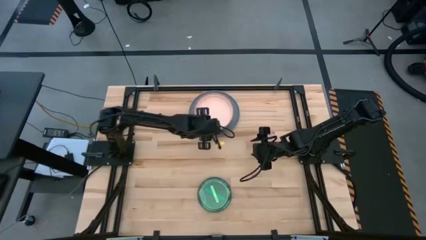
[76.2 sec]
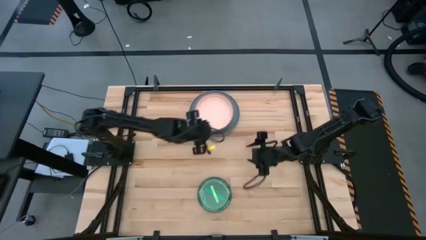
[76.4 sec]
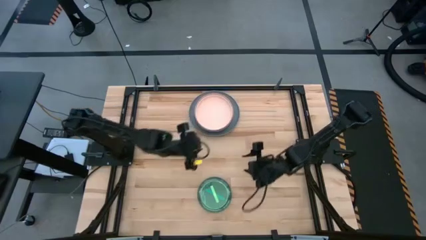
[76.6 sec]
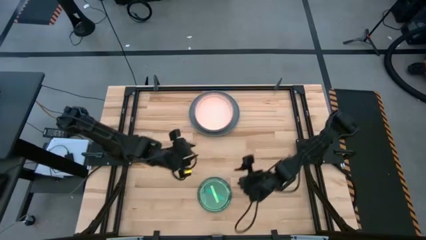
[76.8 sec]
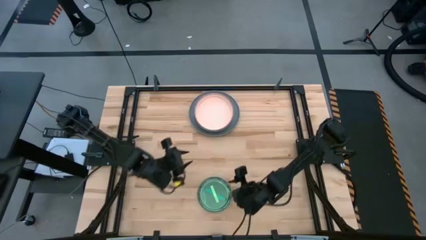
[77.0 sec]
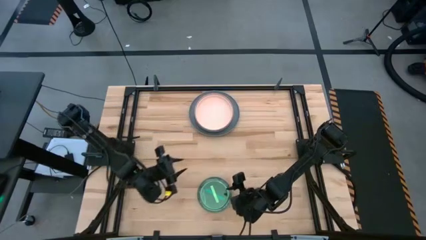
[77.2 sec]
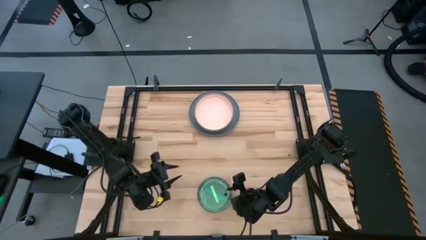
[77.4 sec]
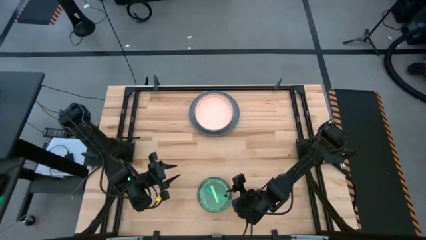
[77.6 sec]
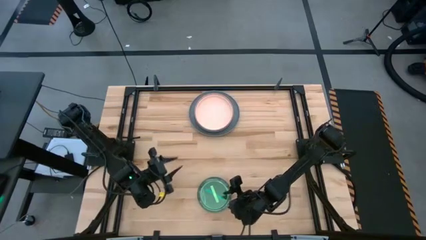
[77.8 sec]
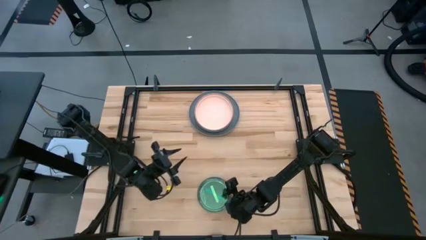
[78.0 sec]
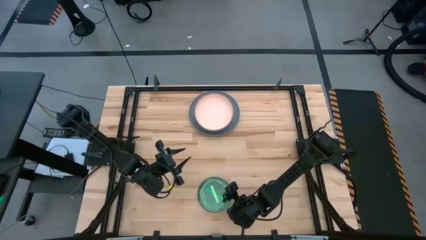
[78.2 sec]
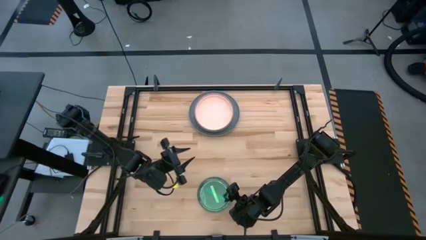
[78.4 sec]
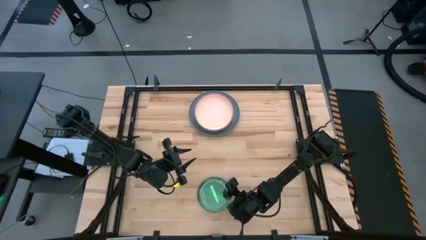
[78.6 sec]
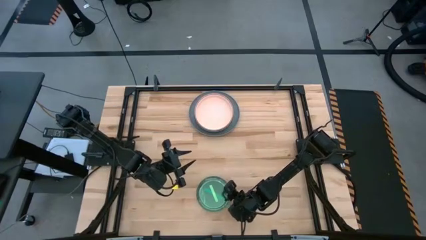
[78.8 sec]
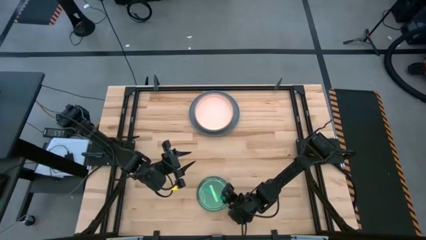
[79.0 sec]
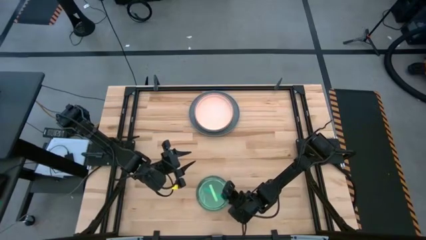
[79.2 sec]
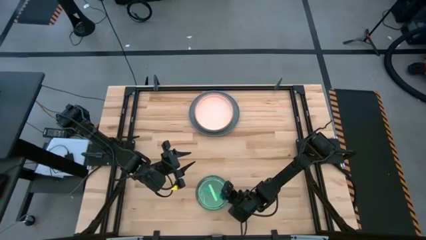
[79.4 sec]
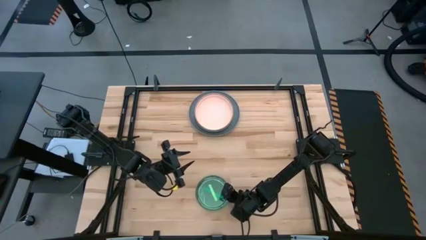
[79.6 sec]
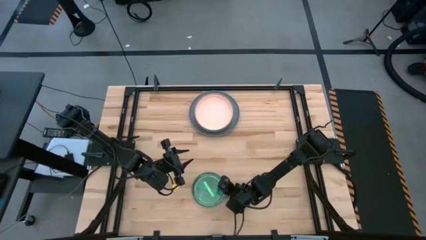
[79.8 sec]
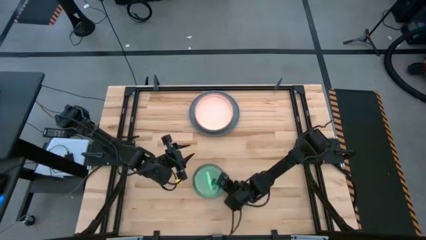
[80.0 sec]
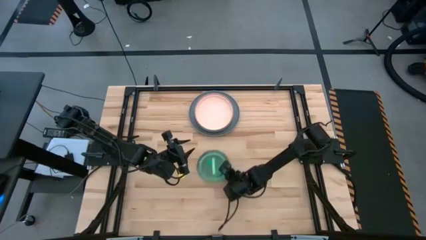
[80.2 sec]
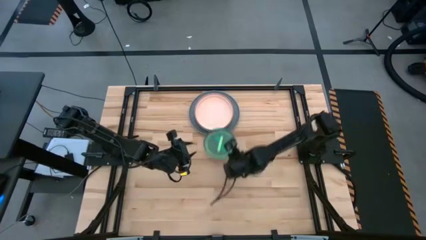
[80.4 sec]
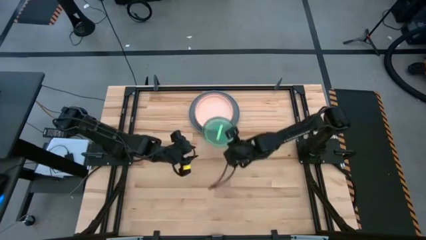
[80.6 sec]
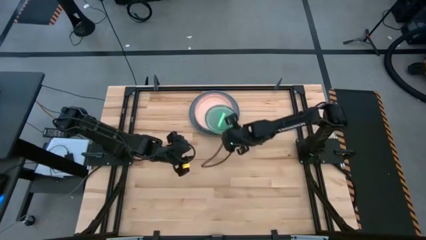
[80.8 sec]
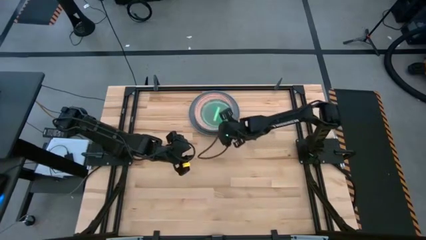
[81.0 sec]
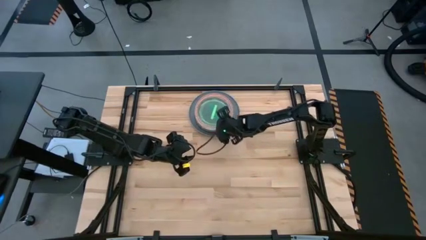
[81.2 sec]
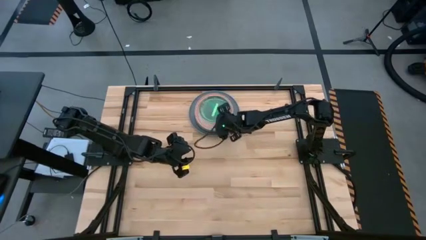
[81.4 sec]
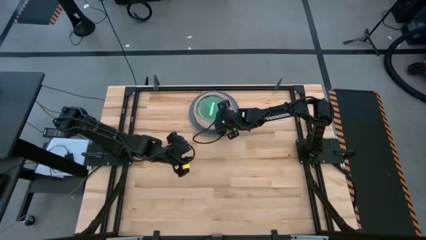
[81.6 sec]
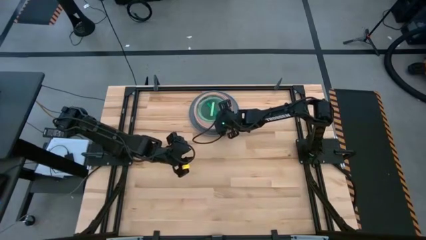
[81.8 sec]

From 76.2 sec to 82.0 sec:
Task: Stack plastic plates
Stack the plates on the light orange plate

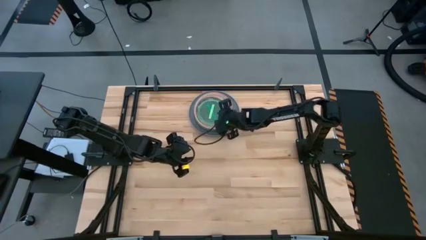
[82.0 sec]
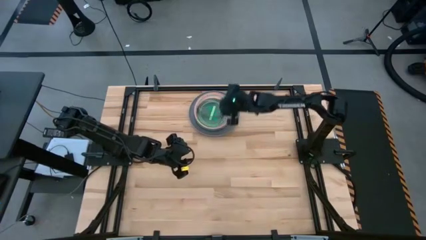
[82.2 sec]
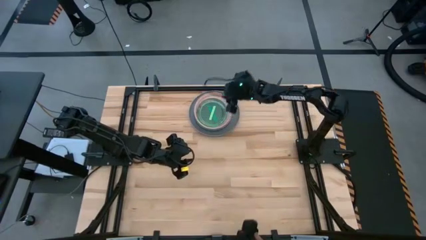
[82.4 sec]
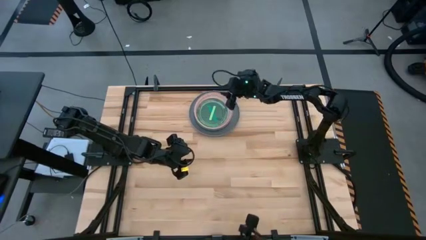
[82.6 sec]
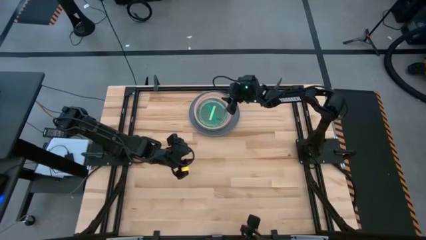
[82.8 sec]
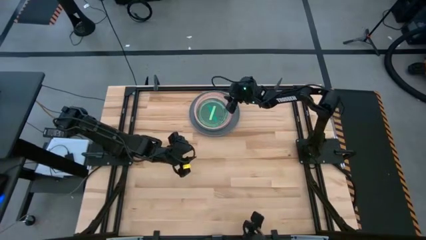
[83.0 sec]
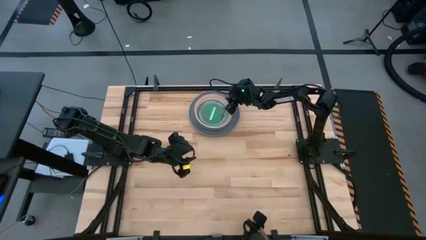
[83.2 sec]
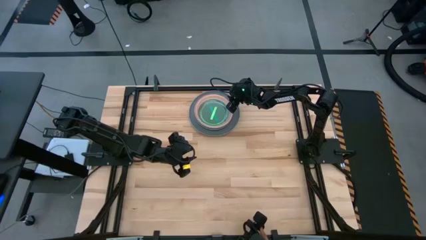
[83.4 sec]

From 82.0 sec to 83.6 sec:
Adjust the plates

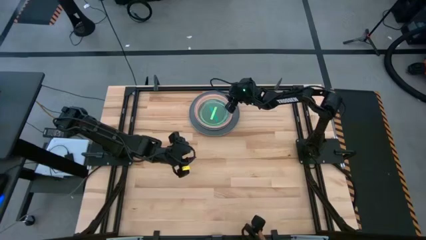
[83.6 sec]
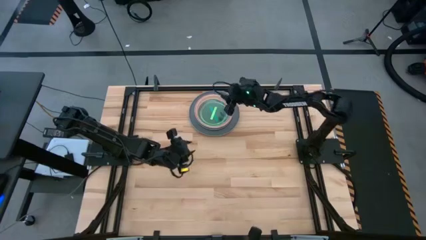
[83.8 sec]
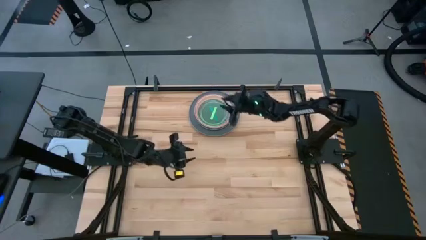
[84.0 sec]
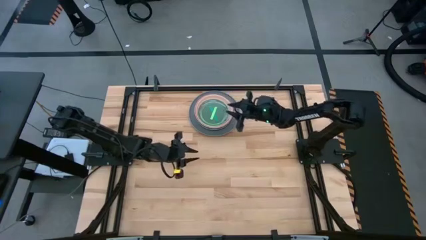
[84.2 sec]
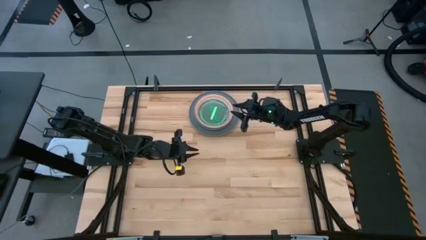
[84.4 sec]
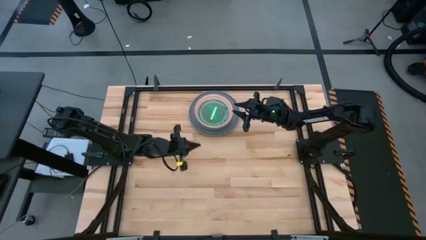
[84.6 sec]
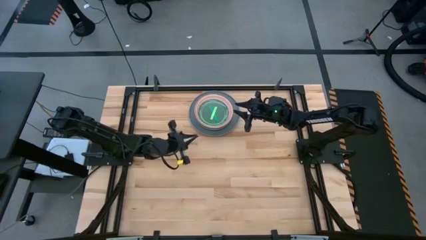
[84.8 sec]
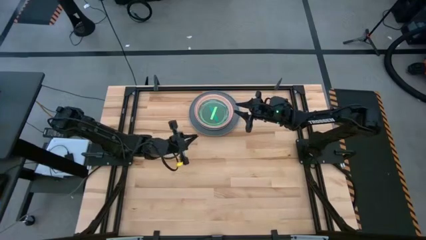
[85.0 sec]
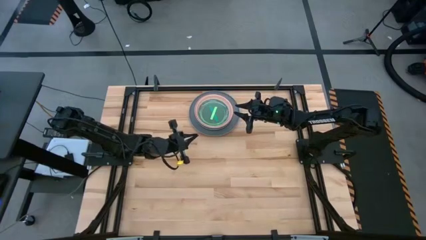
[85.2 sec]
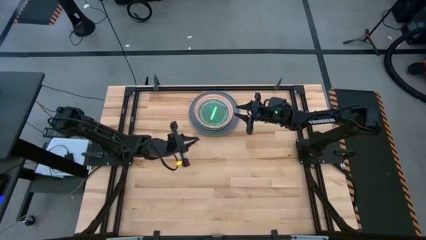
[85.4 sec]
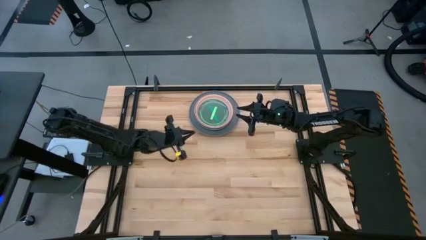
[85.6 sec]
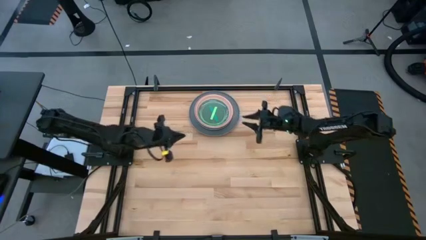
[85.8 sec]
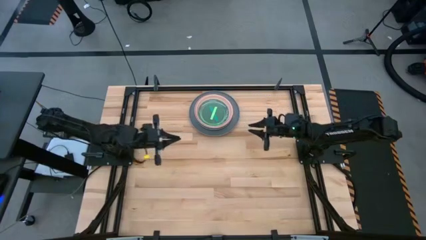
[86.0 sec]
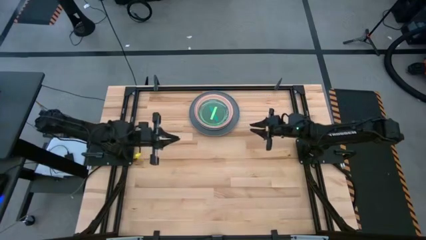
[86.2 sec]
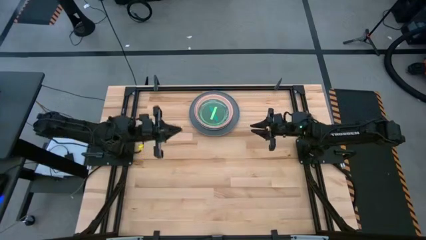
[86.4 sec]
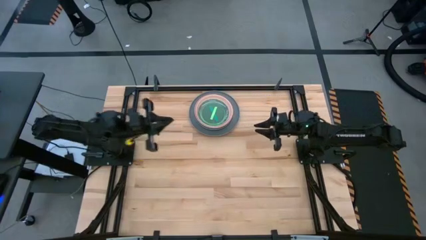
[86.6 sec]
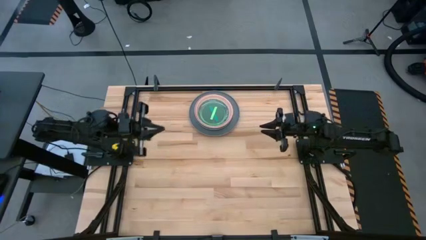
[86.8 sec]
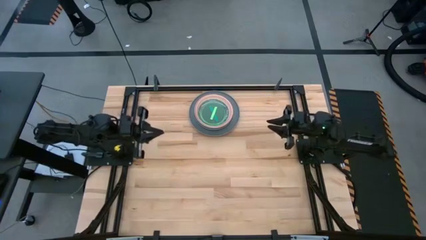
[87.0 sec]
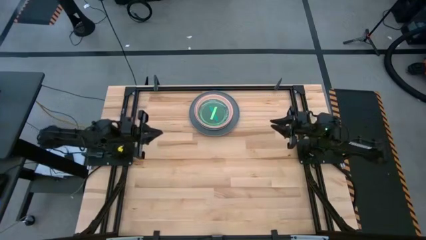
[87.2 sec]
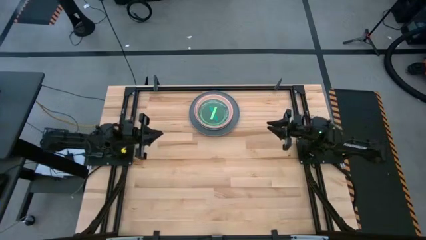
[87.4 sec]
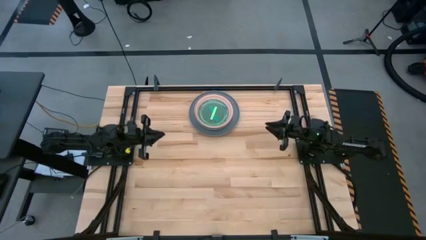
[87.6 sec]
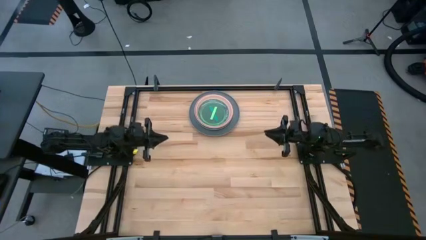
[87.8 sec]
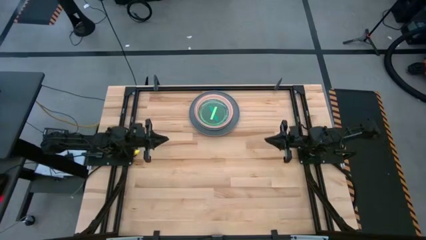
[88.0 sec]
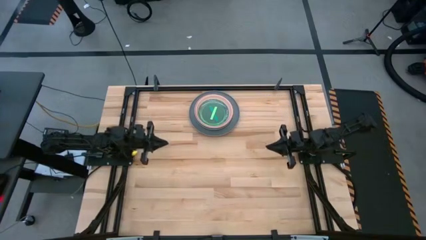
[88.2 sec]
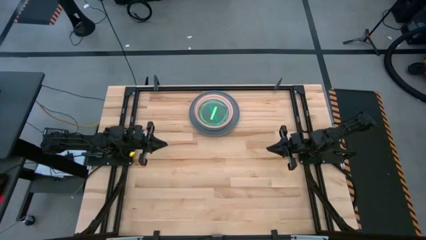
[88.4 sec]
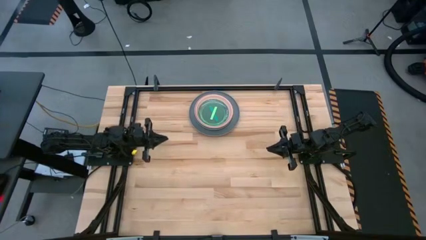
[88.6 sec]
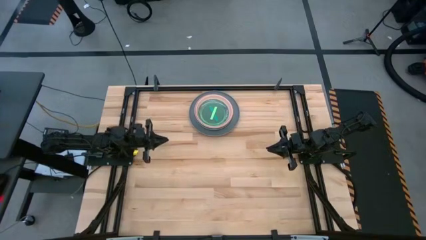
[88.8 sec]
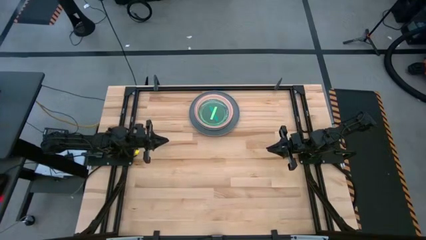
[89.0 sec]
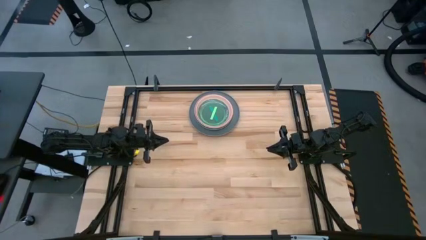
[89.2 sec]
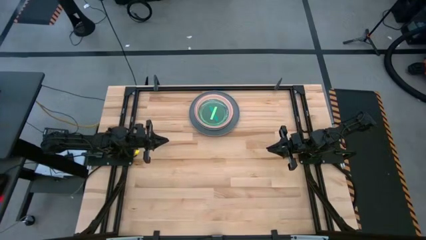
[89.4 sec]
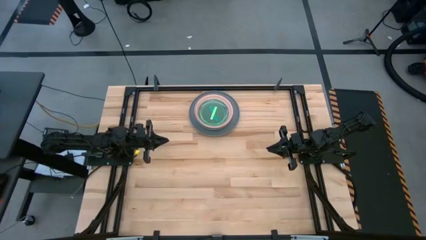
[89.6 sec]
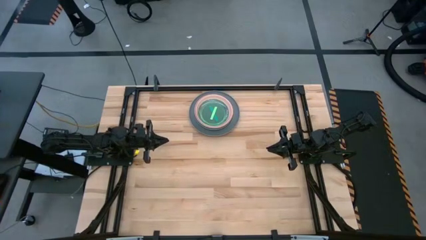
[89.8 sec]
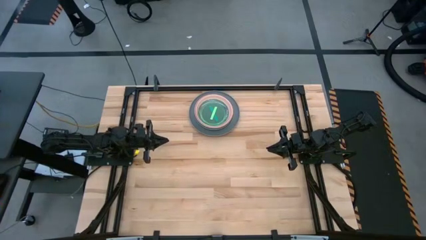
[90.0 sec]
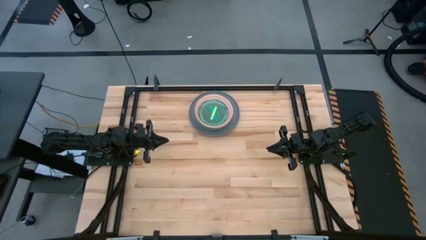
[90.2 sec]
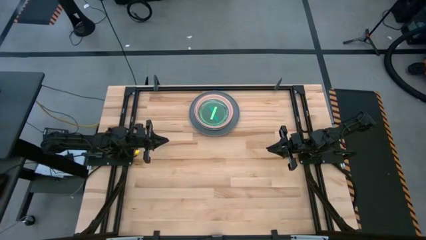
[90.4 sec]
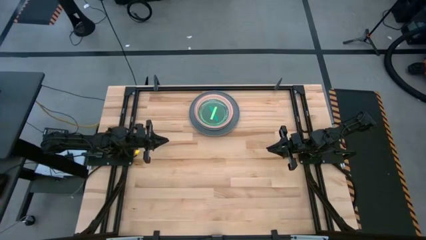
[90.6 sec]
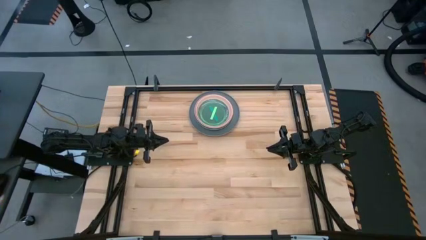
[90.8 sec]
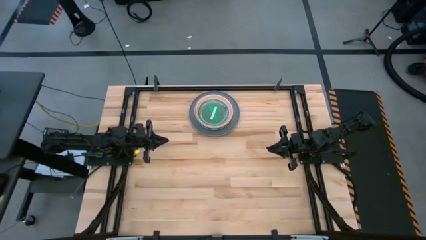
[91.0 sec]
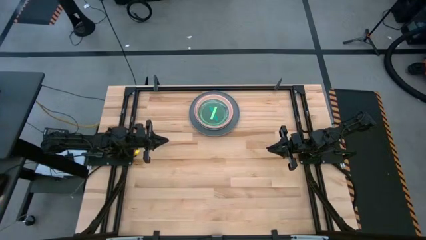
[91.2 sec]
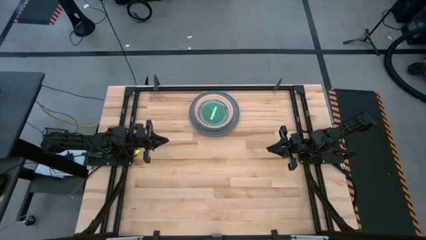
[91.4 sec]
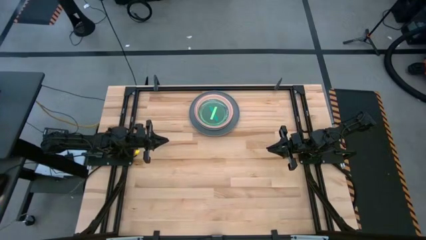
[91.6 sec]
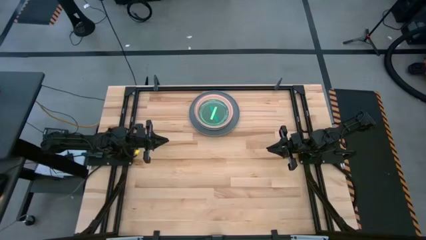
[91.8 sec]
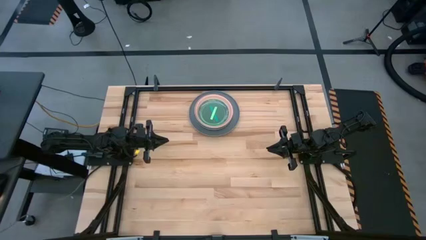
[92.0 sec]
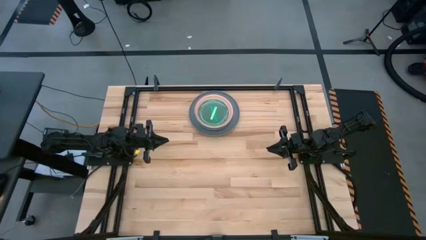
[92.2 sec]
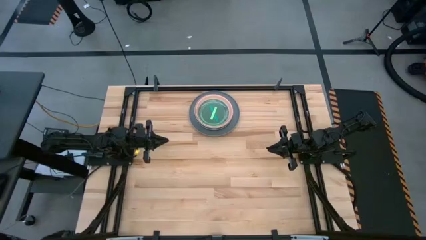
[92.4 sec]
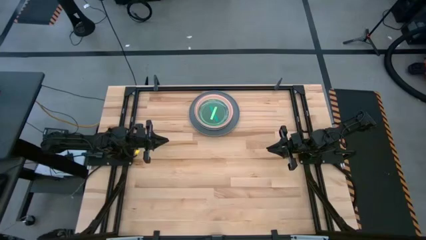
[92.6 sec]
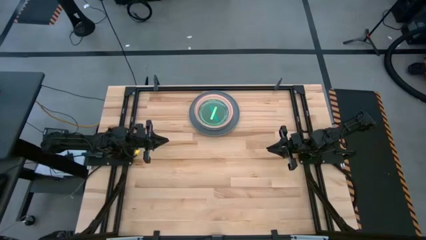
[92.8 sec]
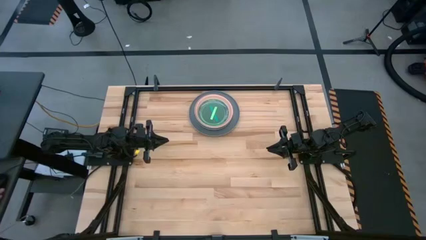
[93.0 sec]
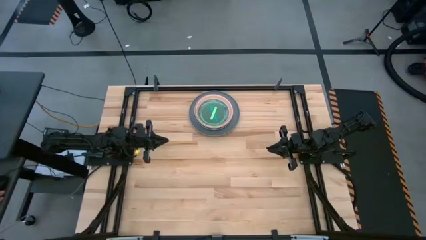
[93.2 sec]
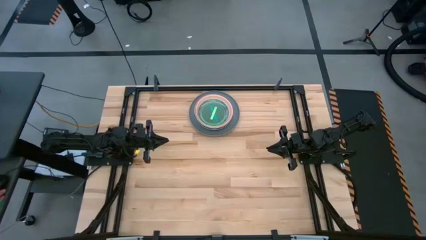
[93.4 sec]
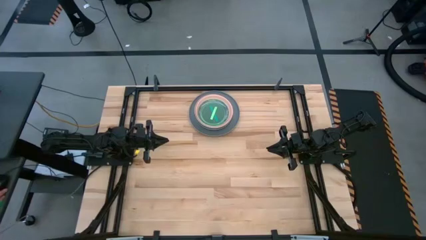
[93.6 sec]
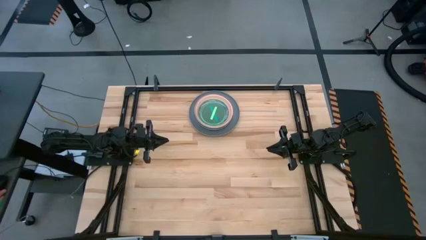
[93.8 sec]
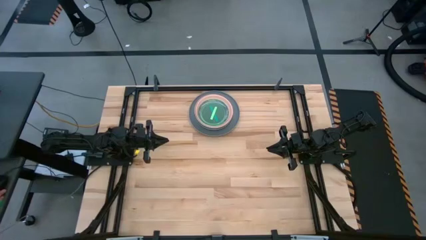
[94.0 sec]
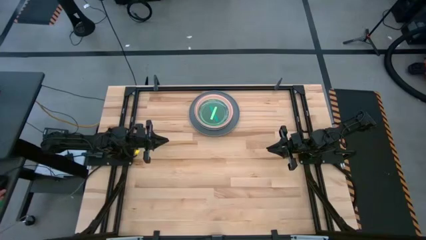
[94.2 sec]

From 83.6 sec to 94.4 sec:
Return to Home Position
